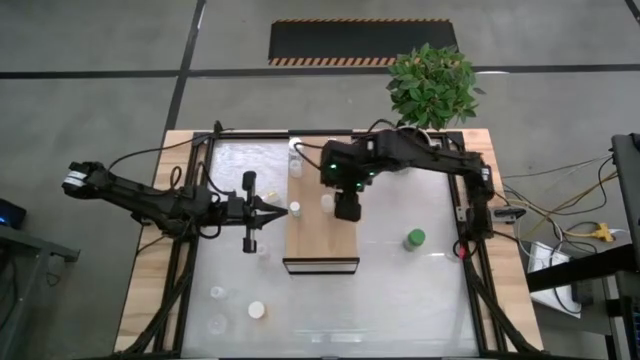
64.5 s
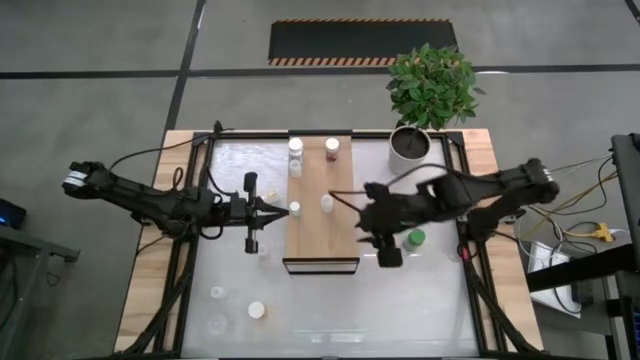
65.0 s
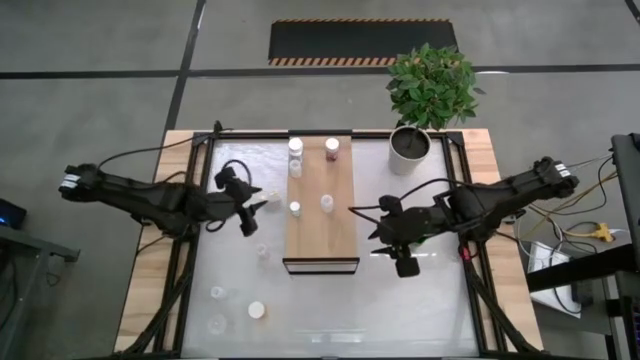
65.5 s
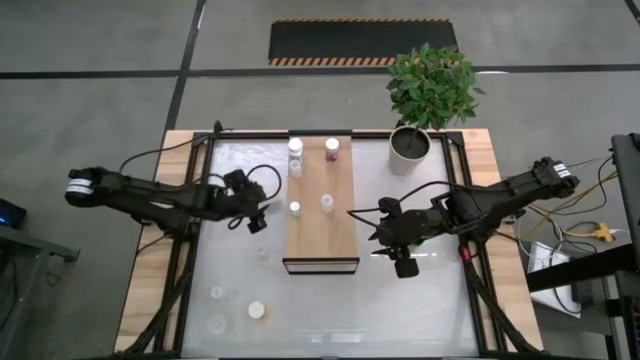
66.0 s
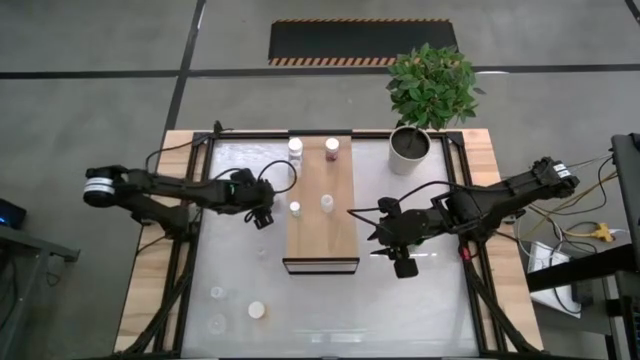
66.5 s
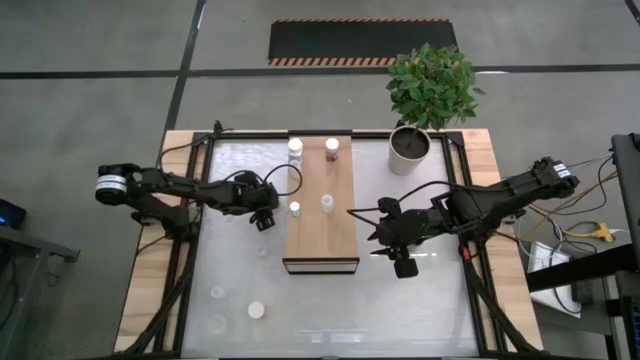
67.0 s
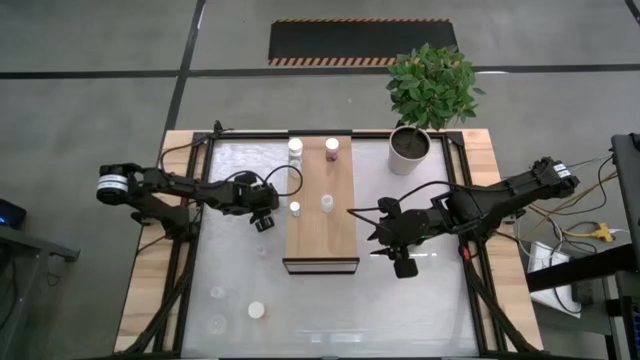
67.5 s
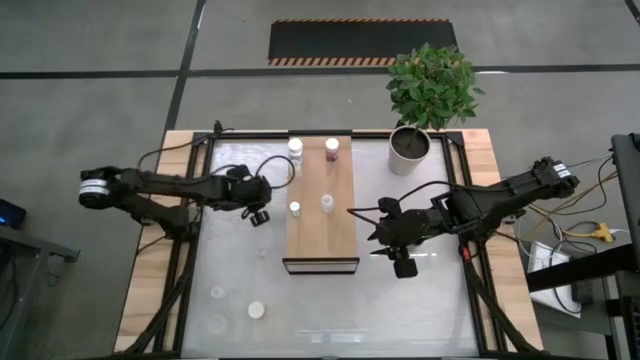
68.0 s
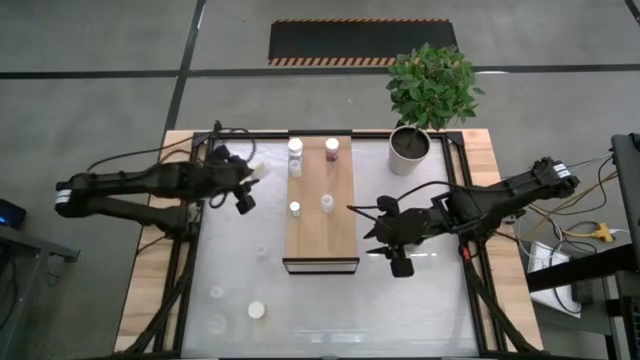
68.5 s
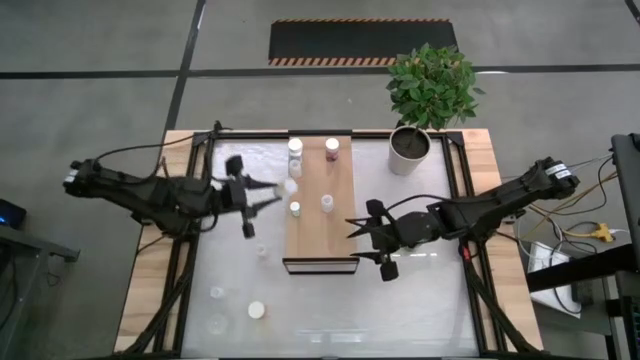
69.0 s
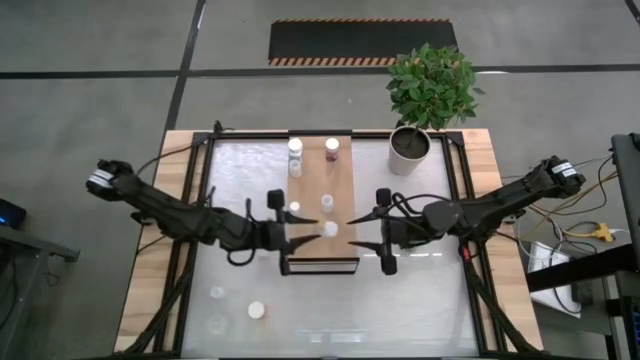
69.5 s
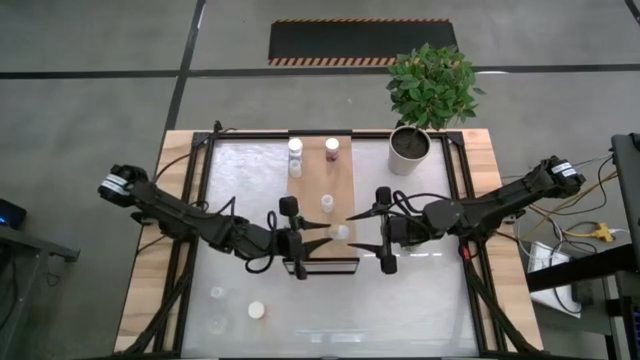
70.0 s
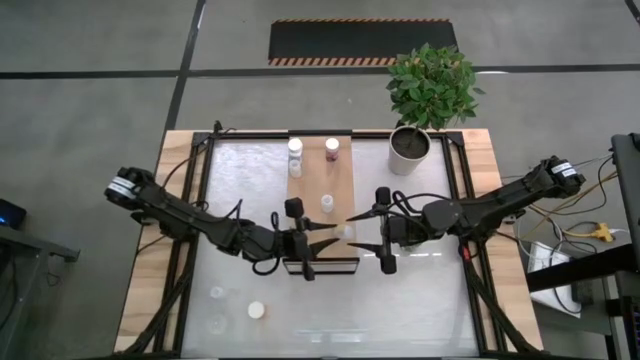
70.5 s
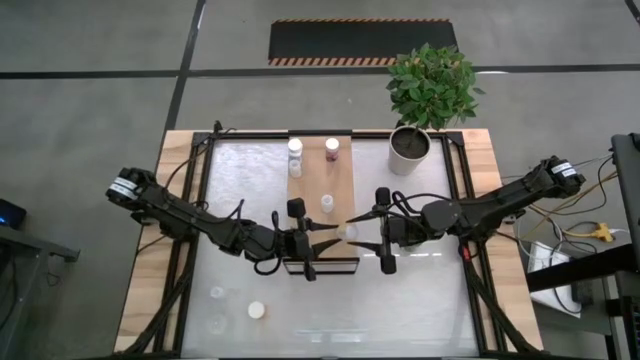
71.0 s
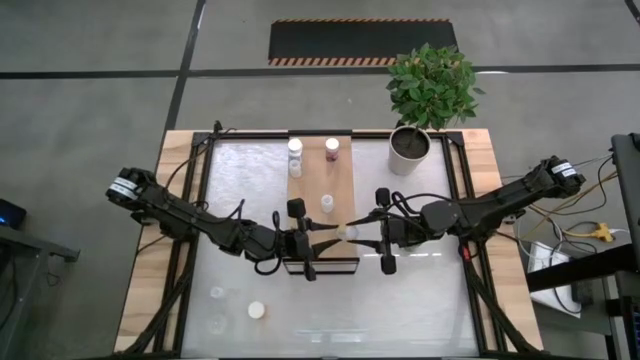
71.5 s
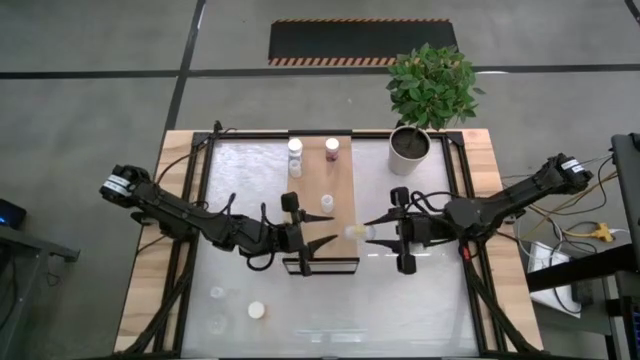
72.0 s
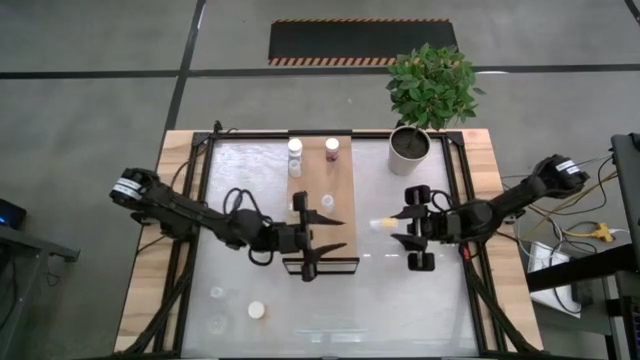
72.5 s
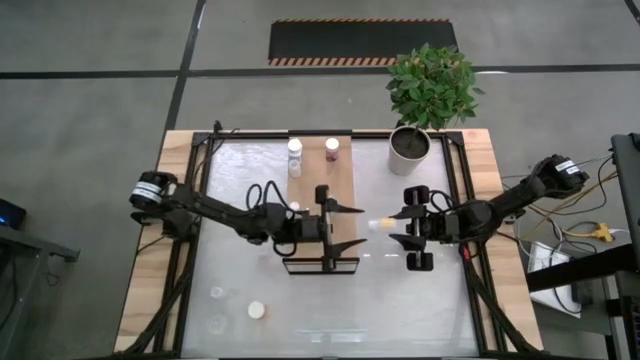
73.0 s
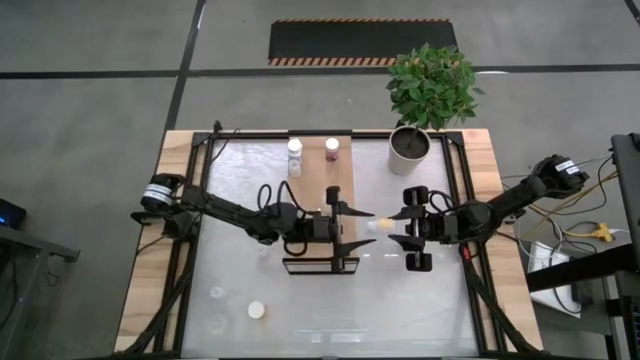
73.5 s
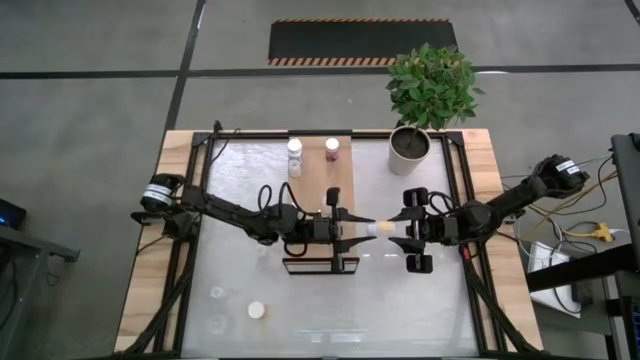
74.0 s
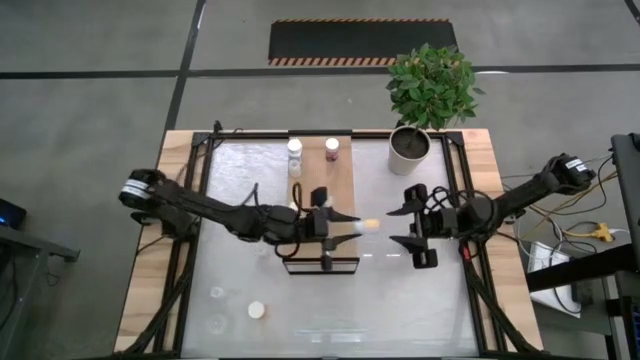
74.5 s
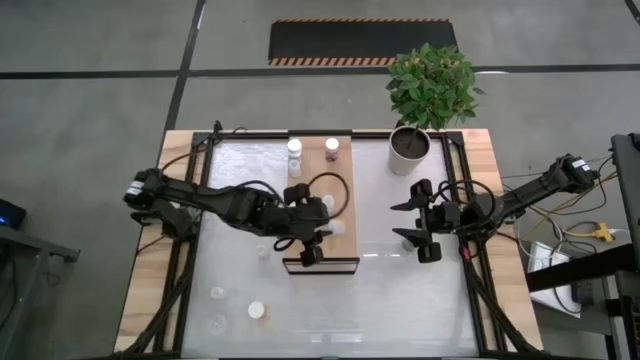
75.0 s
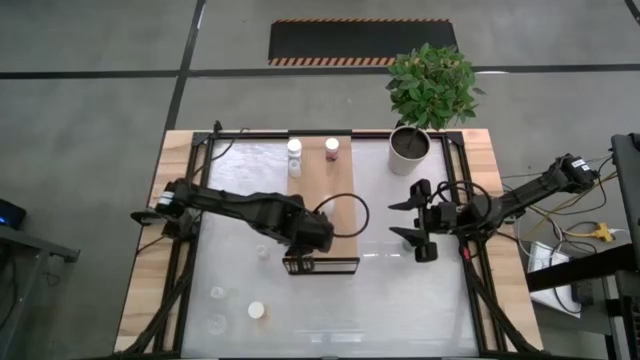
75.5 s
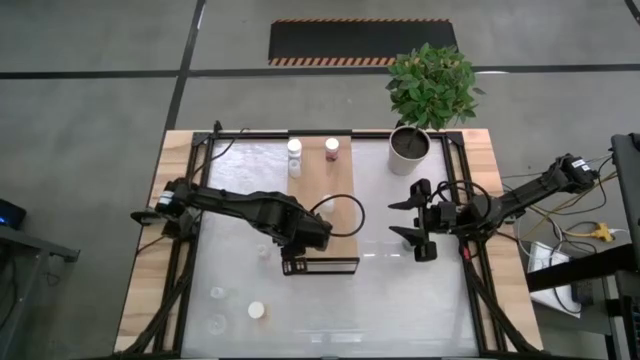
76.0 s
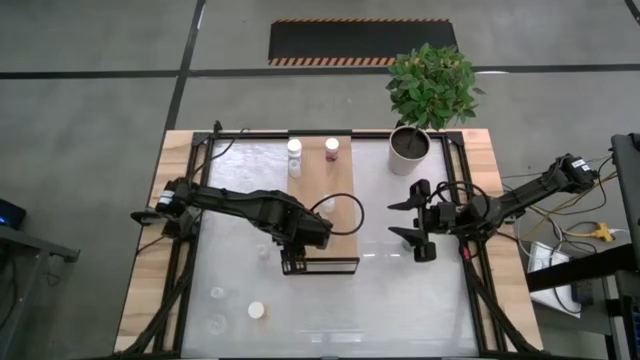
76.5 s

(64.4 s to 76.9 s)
Task: Pick and place medicine bottles onto shelf by color
Put the transparent pill bottle on the shelf

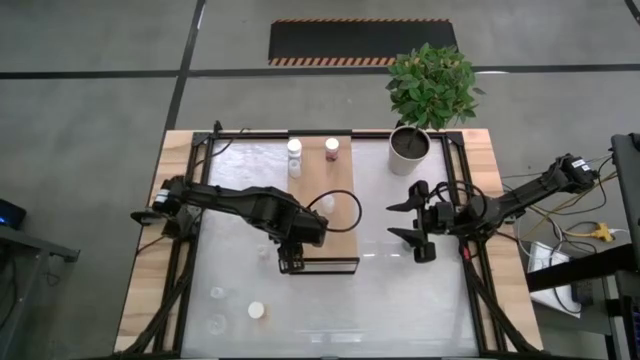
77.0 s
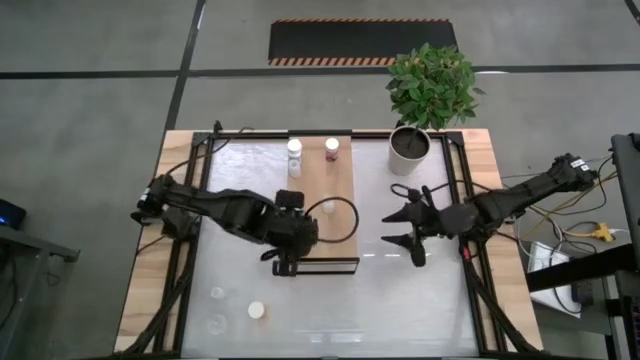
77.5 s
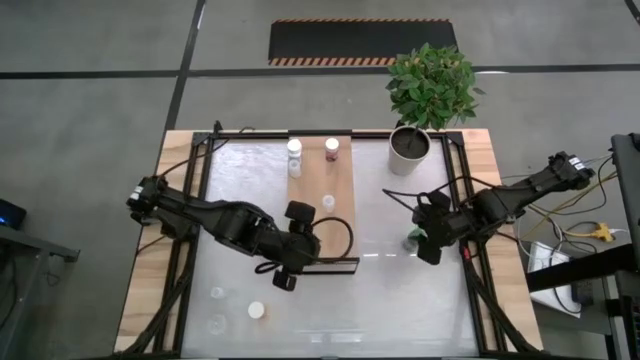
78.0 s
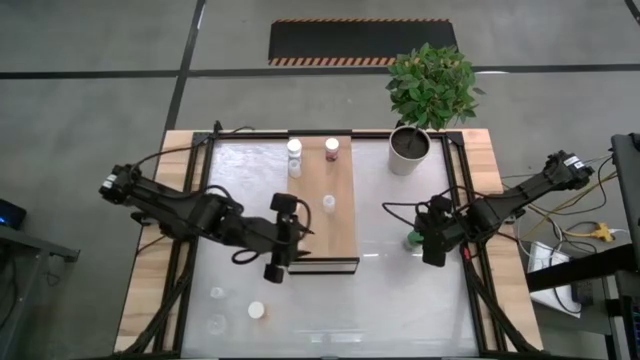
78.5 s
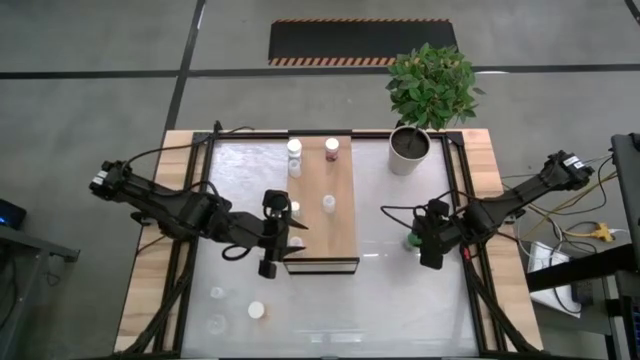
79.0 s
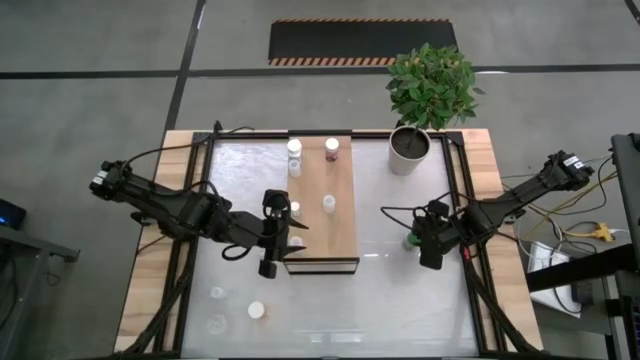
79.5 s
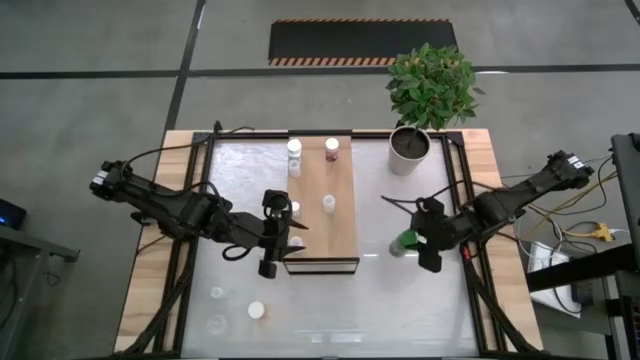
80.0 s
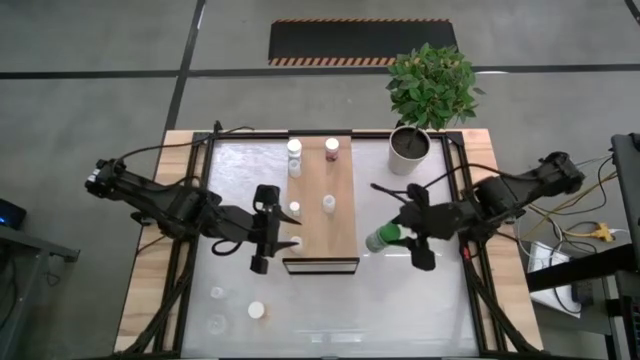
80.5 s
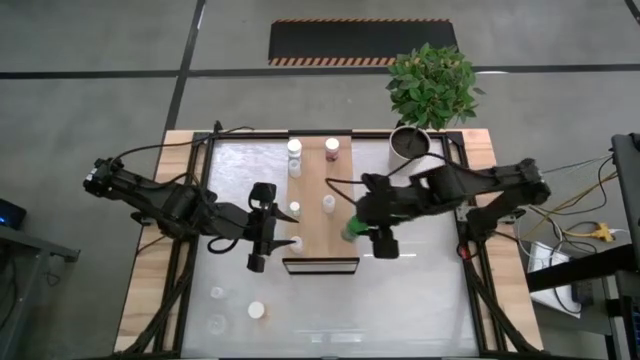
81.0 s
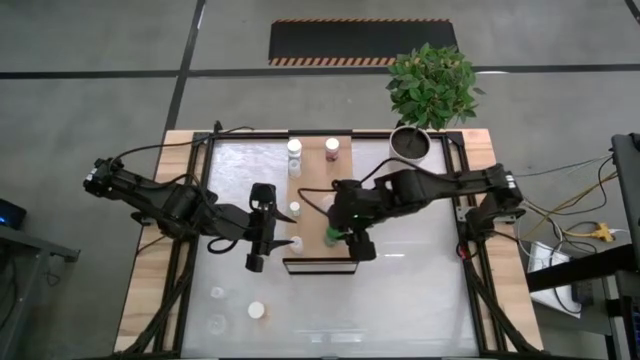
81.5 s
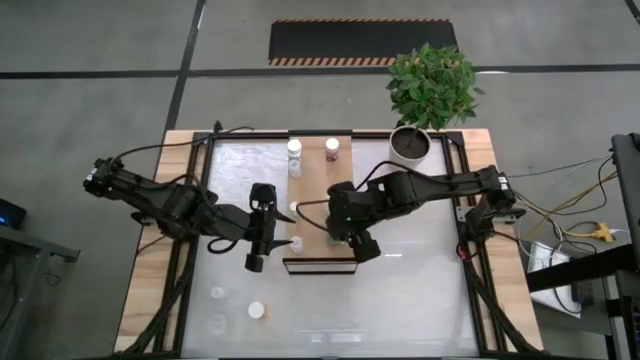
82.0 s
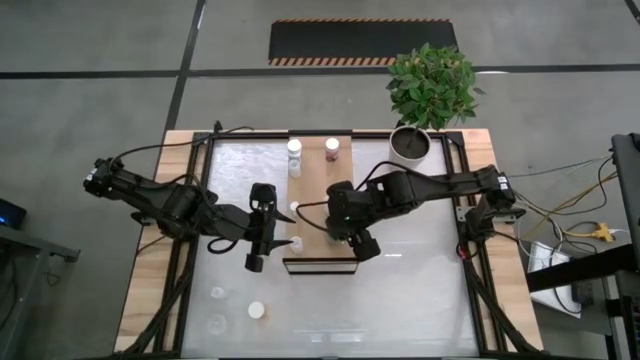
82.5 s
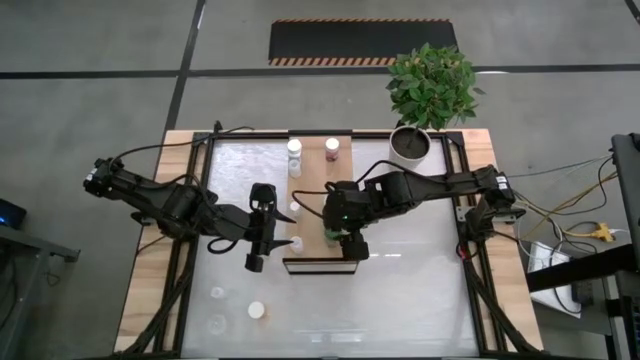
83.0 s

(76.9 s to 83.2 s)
Put the green pill bottle on the shelf

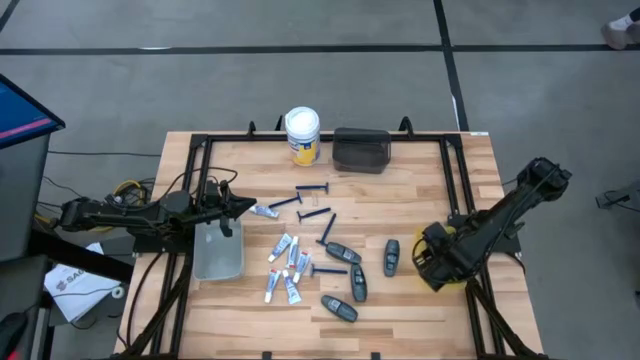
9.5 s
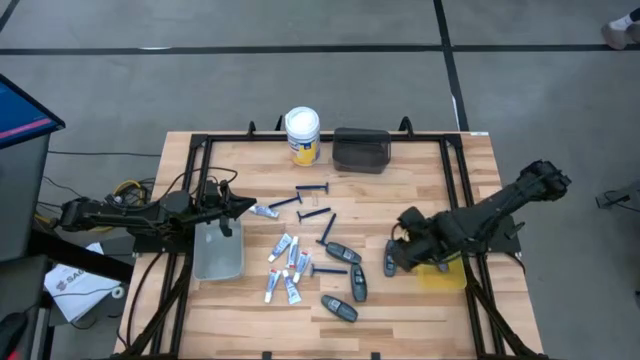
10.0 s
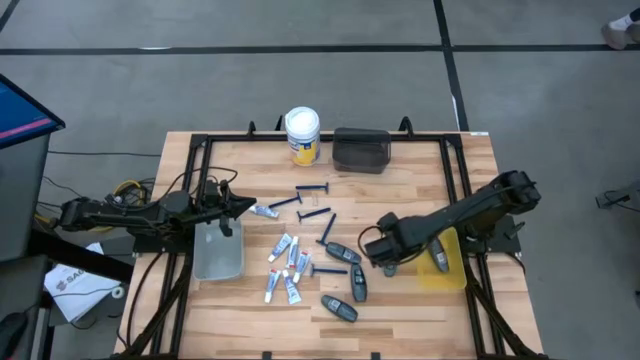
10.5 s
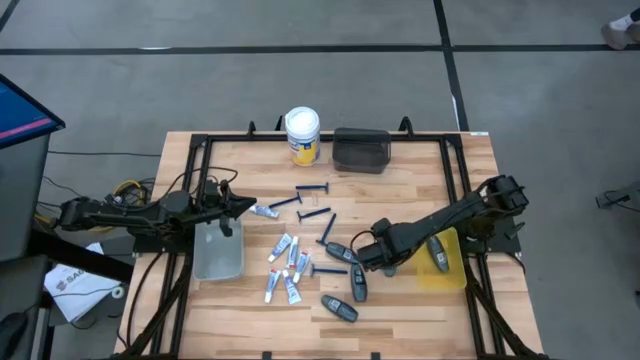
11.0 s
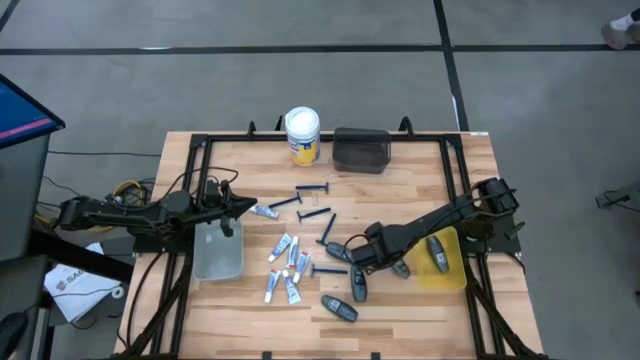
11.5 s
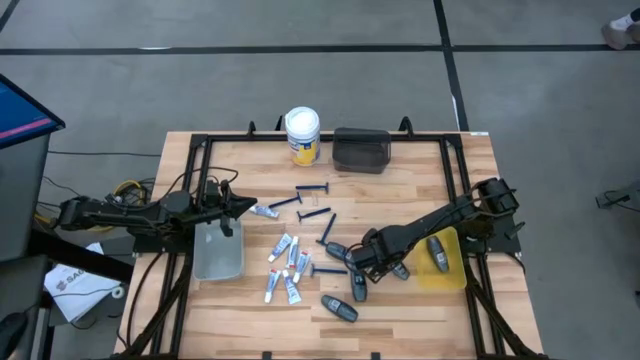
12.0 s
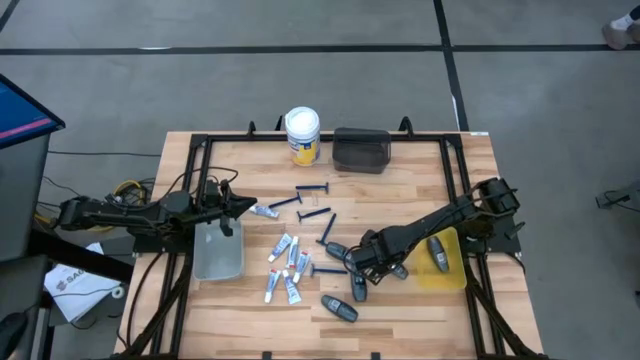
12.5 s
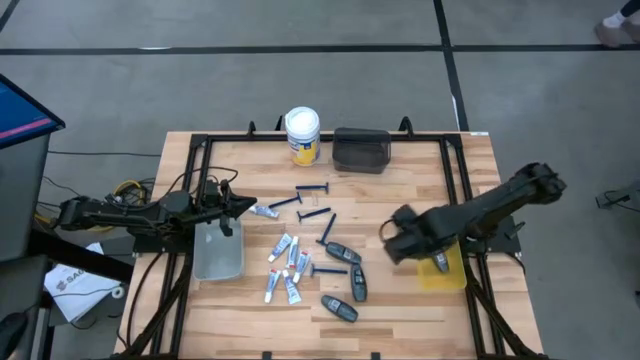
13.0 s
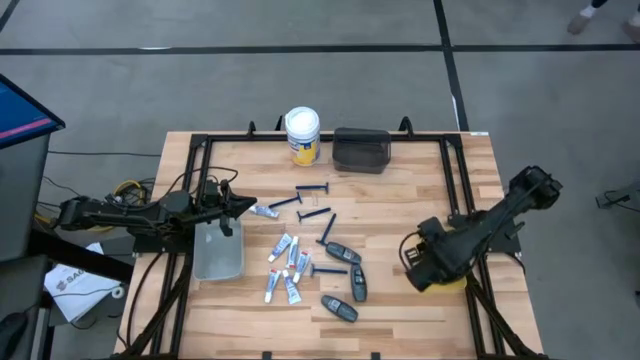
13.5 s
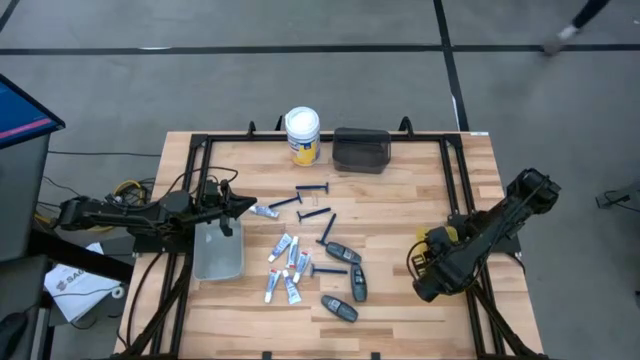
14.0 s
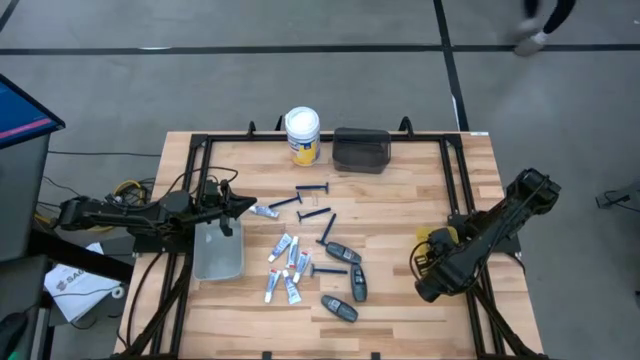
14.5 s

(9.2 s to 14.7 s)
Task: Pick & Place Travel size toiletries
Put the black deodorant into the yellow bin
